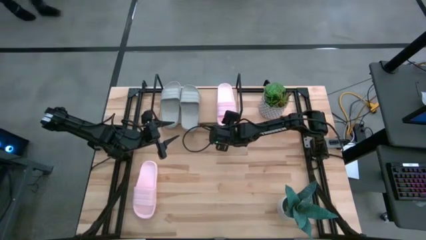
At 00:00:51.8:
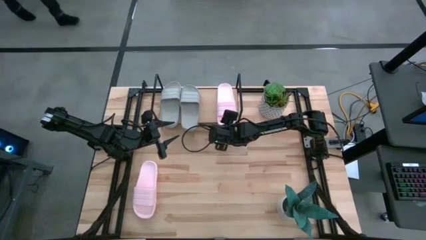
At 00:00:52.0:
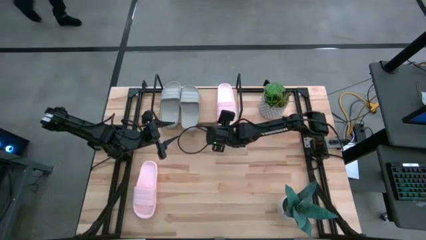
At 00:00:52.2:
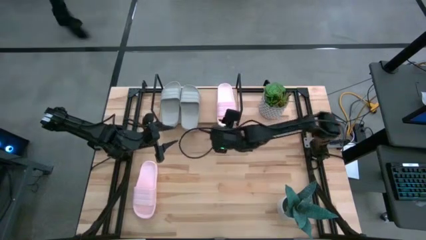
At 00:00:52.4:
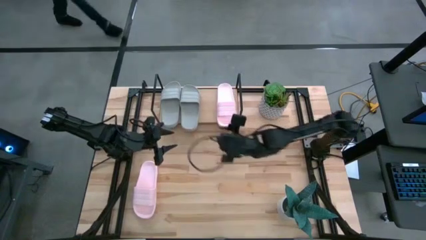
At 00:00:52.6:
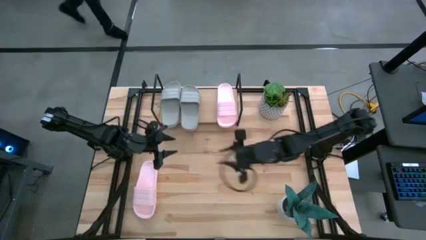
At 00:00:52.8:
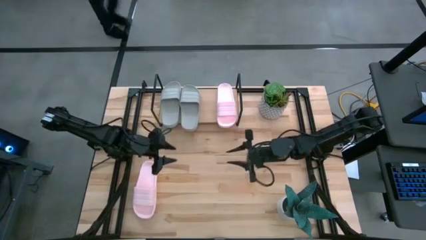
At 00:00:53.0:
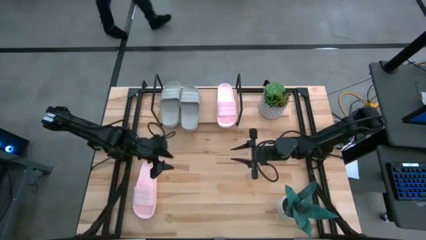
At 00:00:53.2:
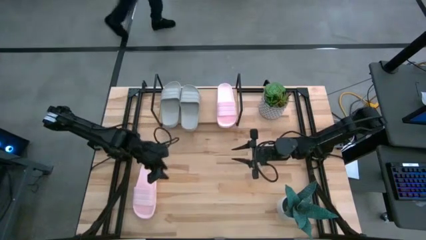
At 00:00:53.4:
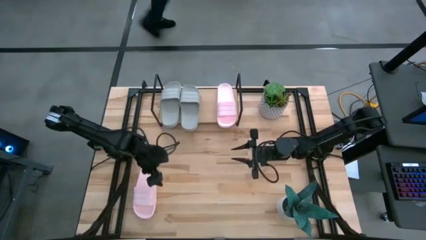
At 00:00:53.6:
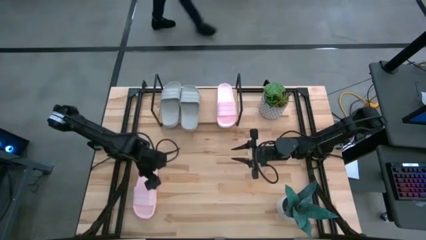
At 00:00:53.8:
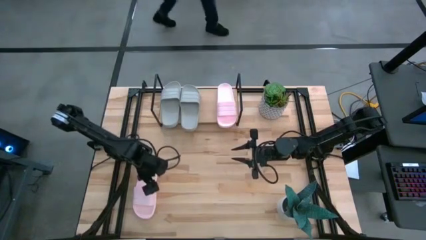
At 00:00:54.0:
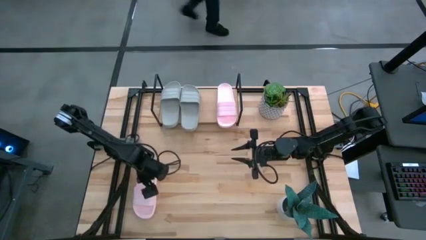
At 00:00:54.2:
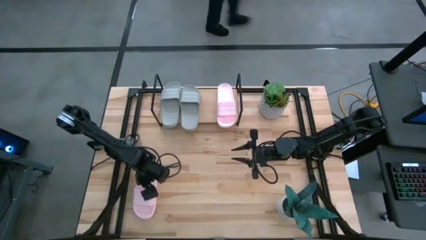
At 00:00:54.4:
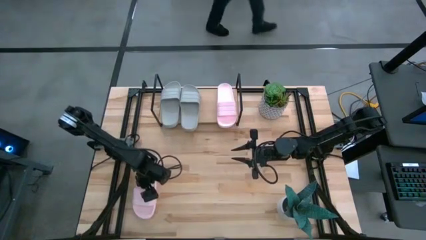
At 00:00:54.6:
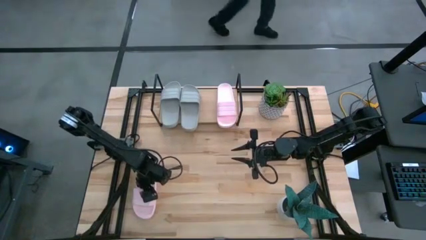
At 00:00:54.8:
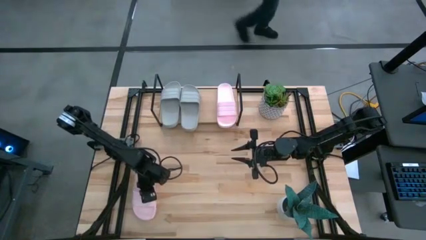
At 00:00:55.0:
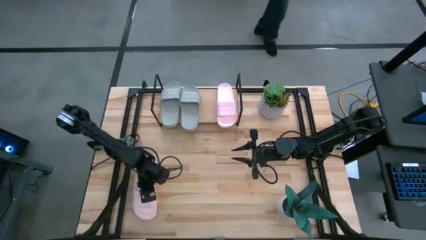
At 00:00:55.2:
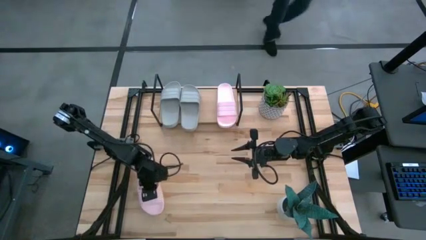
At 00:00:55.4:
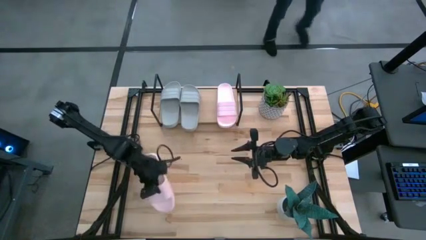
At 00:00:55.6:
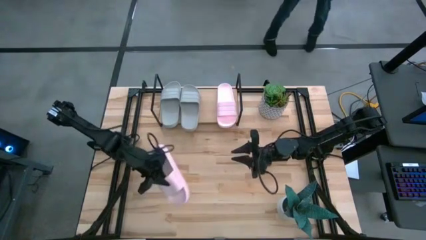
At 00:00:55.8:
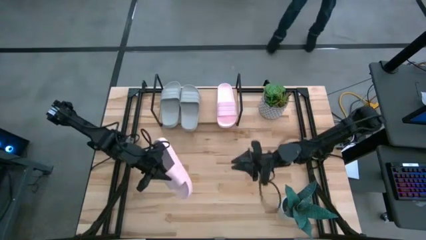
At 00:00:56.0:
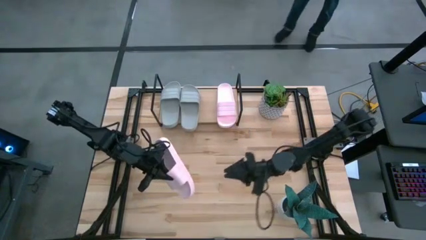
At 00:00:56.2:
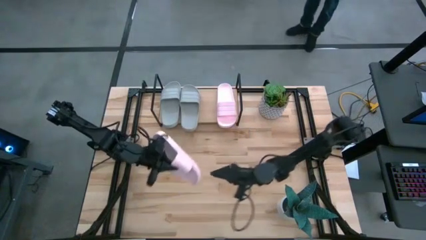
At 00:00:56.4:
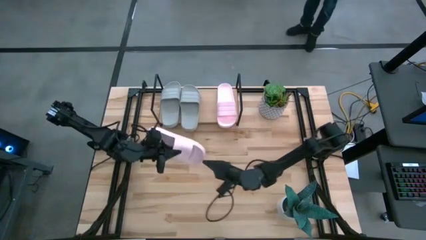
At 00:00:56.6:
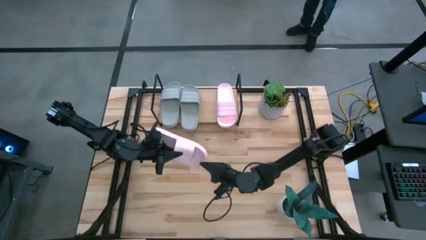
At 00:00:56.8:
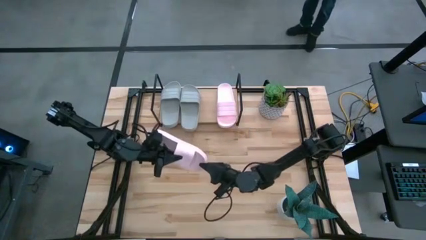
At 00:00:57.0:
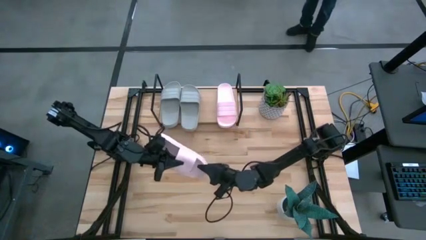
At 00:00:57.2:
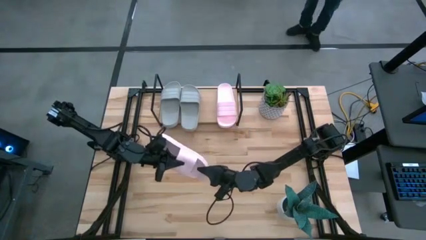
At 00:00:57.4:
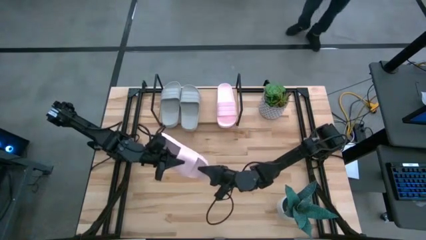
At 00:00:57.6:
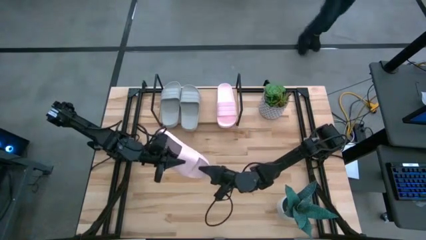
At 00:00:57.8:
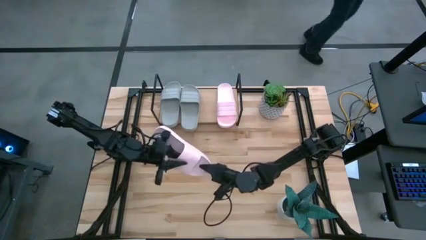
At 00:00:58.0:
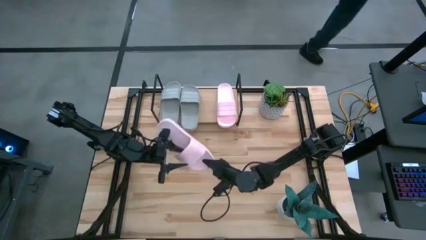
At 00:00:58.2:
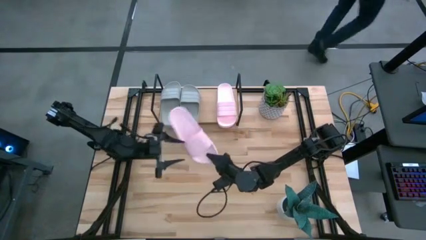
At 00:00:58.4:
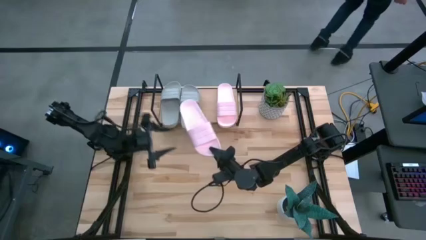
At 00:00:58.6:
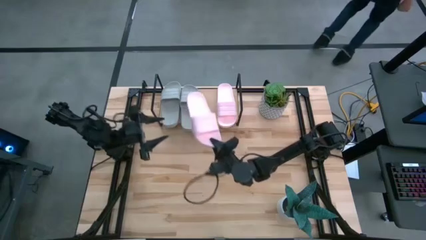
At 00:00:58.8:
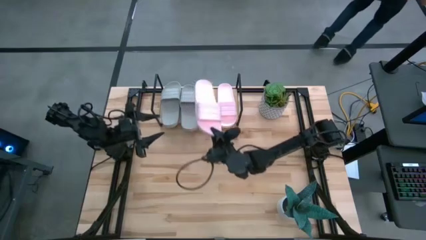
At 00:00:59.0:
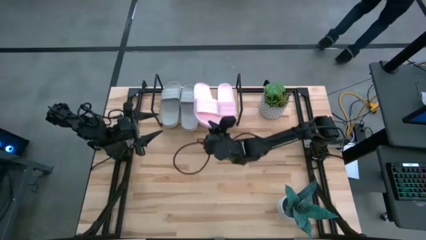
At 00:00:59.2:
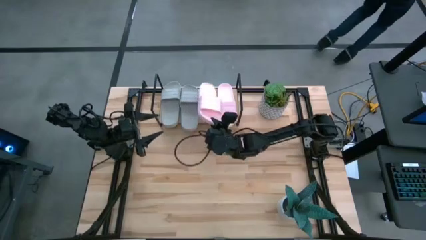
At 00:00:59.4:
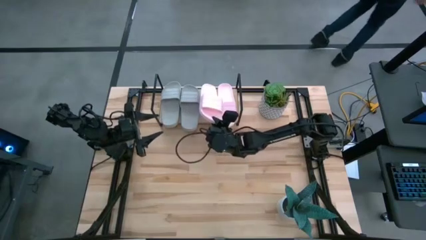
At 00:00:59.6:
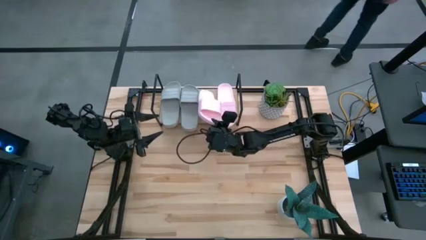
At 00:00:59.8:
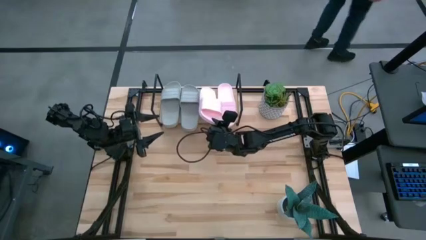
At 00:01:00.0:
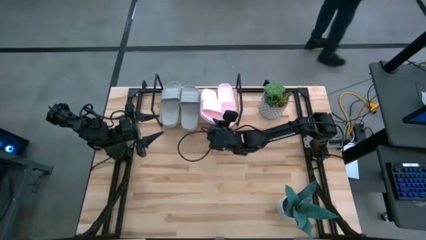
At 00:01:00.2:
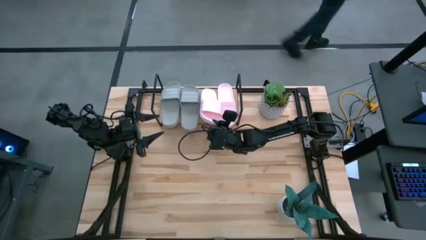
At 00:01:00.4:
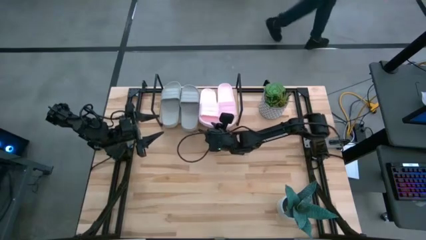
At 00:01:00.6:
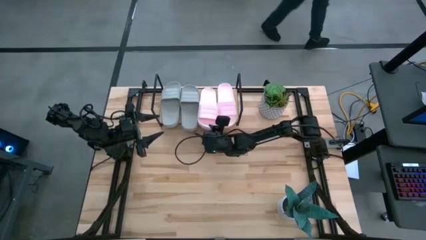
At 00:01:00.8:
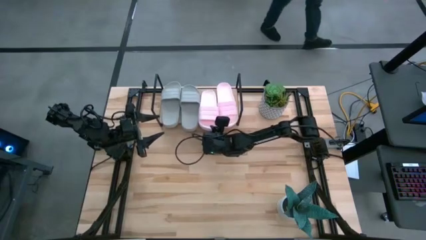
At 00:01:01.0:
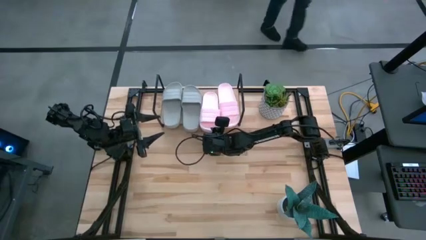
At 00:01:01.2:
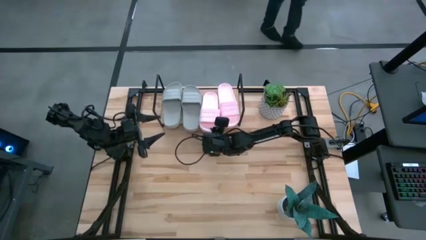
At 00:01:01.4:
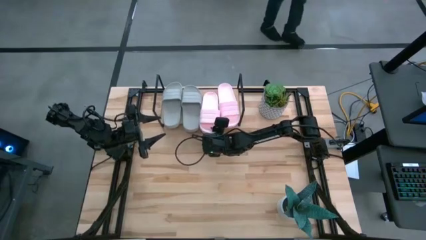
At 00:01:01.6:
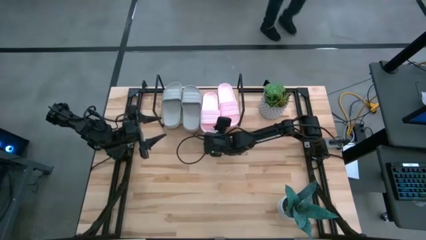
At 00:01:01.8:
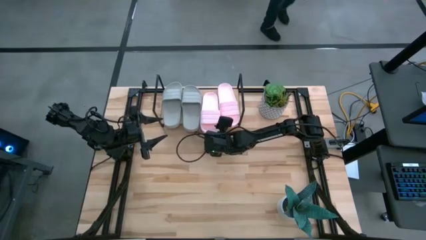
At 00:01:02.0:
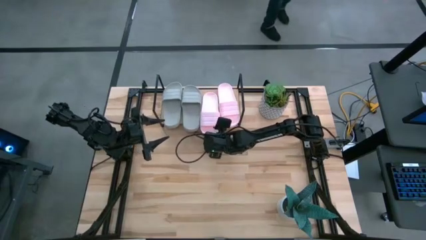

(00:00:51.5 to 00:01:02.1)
Task: Pick and place slides into the shelf
Put the pink slipper on the shelf

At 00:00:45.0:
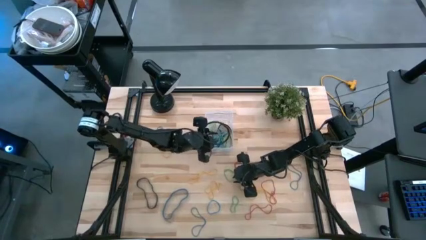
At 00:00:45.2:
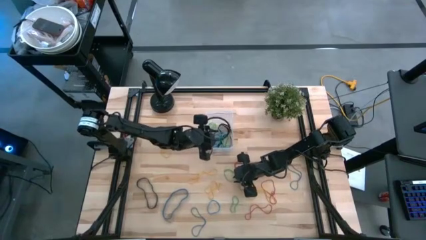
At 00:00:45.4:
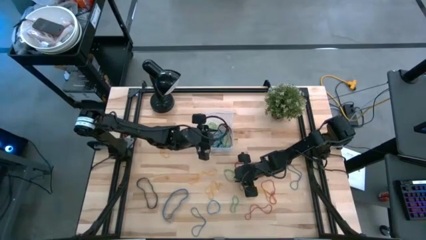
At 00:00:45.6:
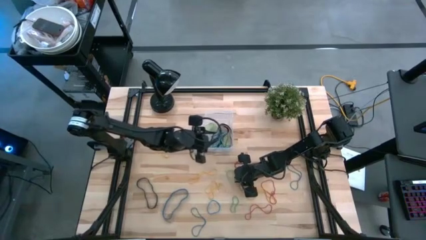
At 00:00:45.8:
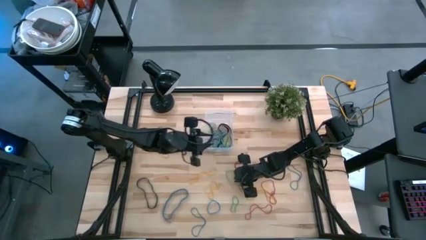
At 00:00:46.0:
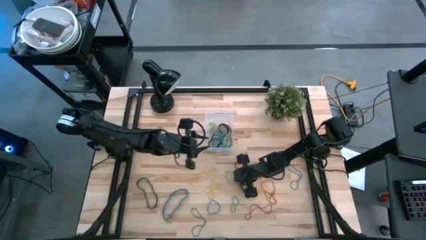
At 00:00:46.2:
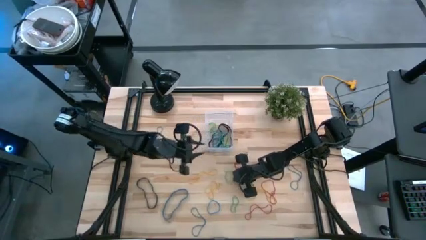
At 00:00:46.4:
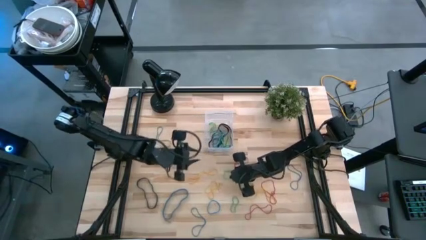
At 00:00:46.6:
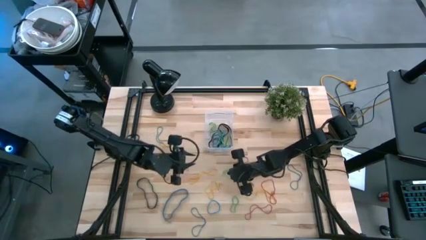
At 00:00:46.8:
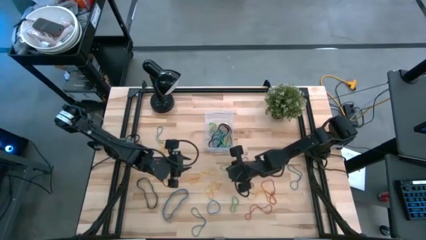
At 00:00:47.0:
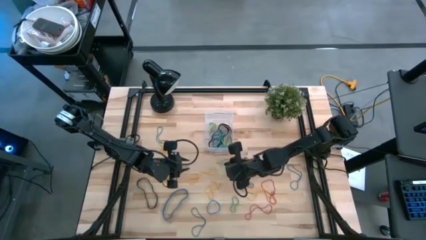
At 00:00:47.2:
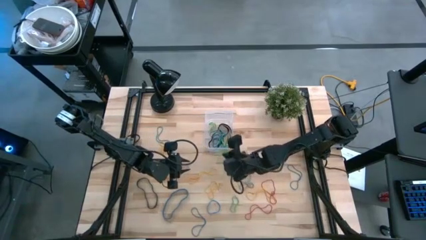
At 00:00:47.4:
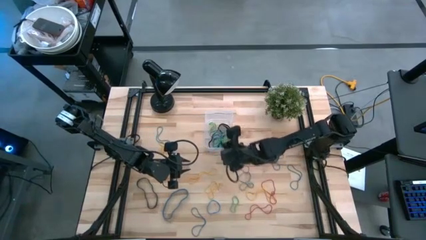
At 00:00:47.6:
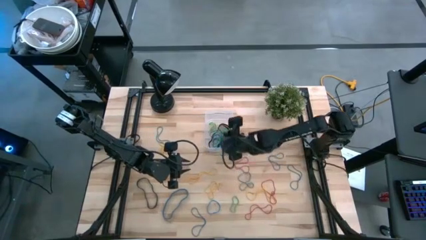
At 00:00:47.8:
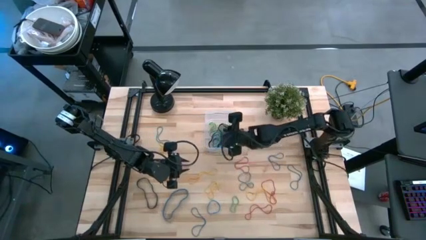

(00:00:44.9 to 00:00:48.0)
Task: Pick and place rubber bands into bin
Put green rubberband into the transparent bin
